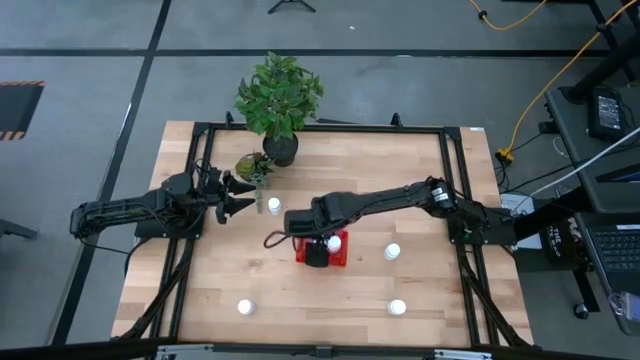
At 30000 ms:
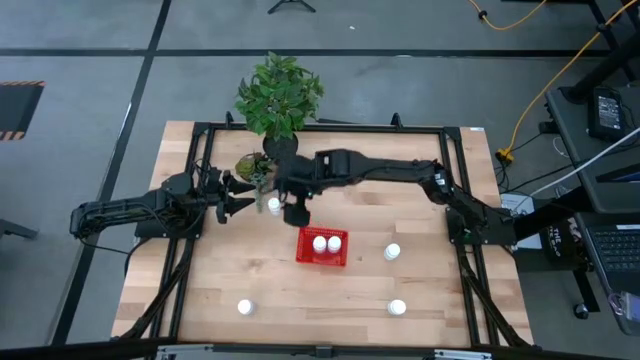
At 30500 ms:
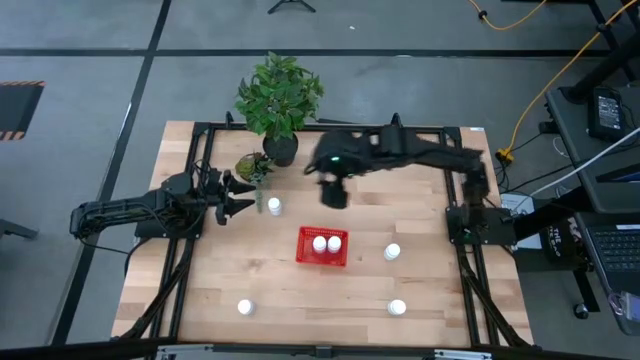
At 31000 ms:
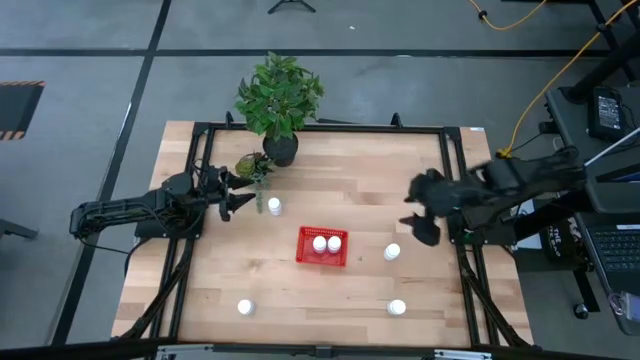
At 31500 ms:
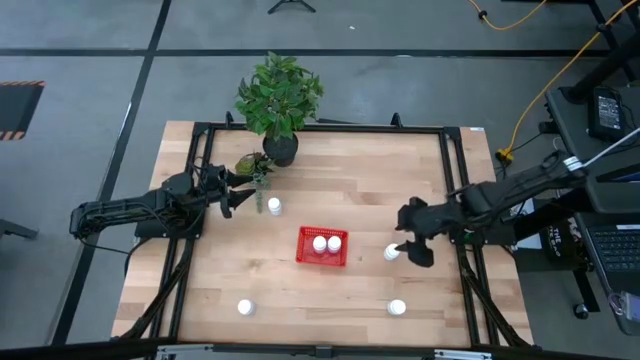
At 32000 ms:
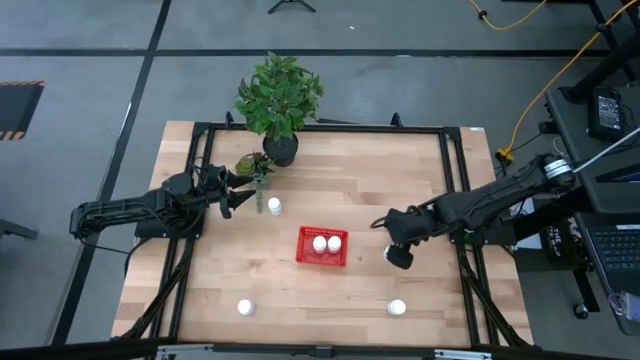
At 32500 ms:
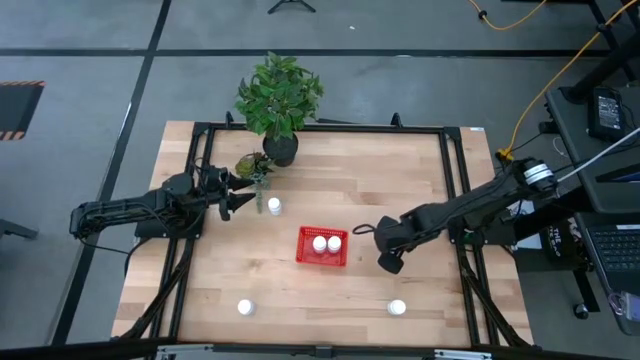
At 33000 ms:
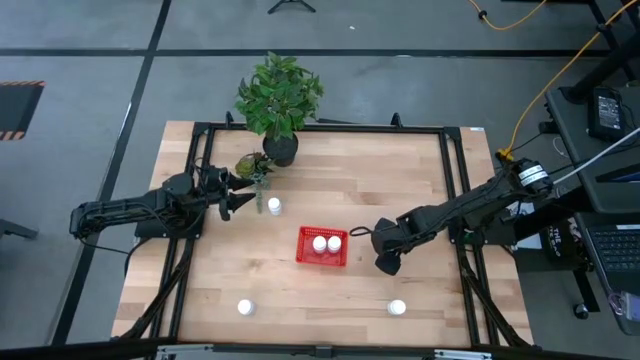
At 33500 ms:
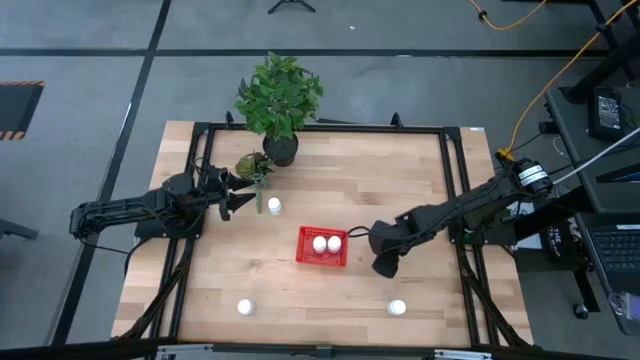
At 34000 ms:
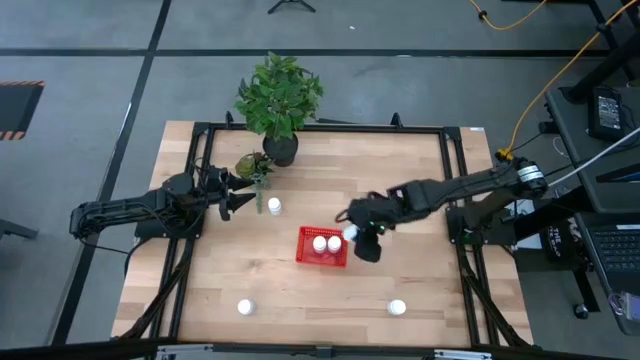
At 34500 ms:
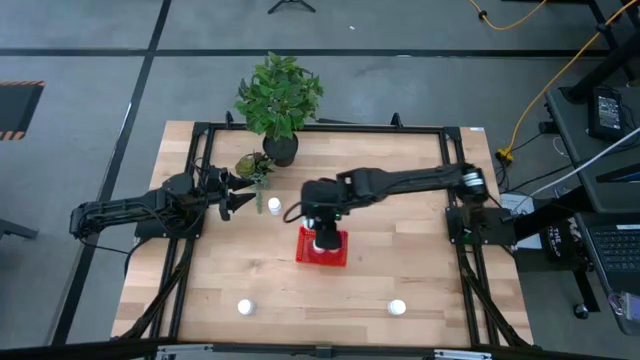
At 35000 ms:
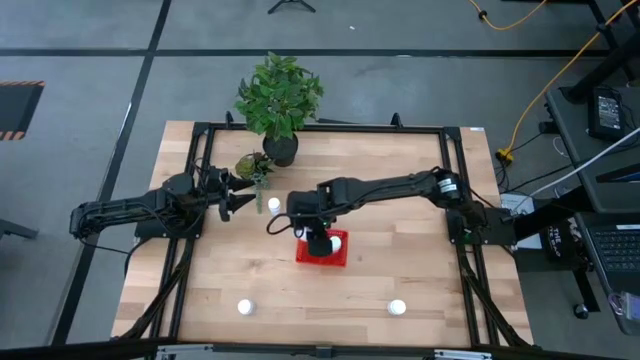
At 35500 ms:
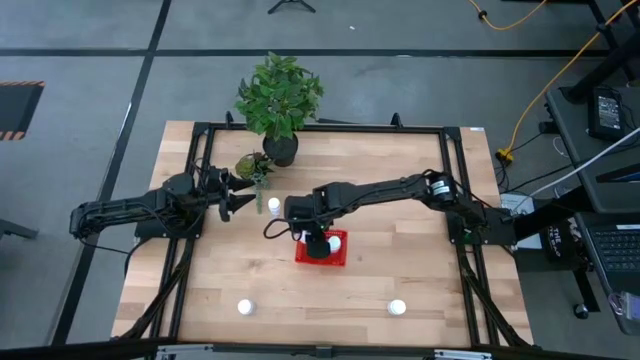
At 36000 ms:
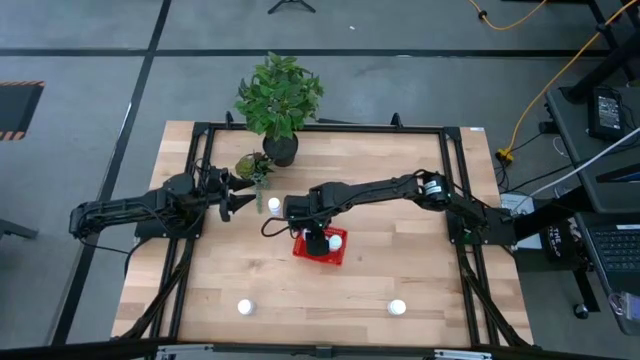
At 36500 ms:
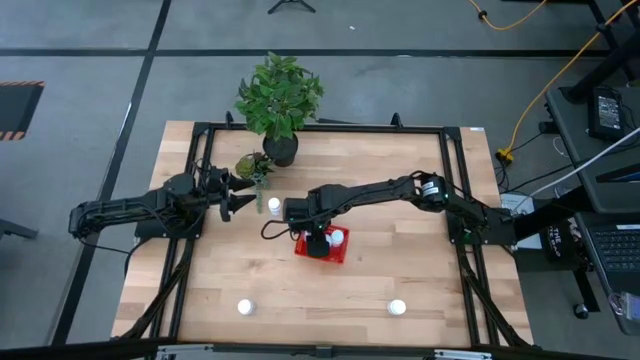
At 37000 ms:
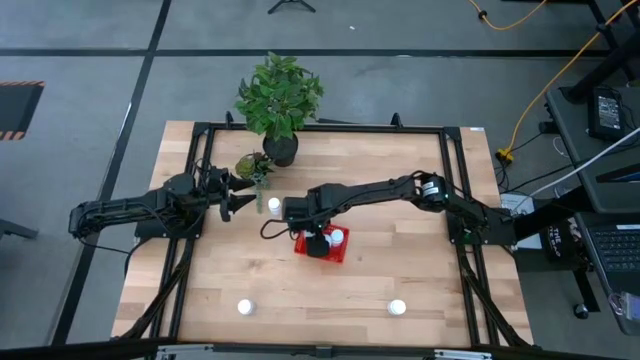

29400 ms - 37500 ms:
Task: Pick and place pill bottles into a basket
Put the white pill bottle into the bin

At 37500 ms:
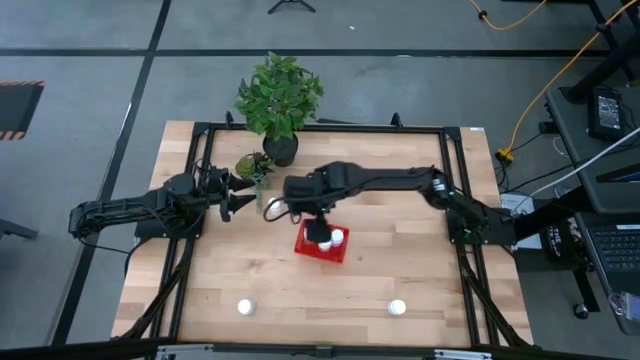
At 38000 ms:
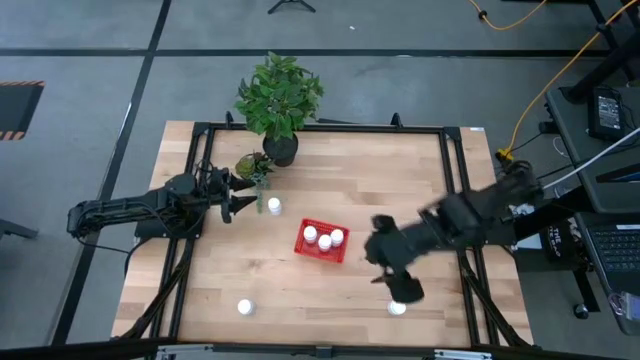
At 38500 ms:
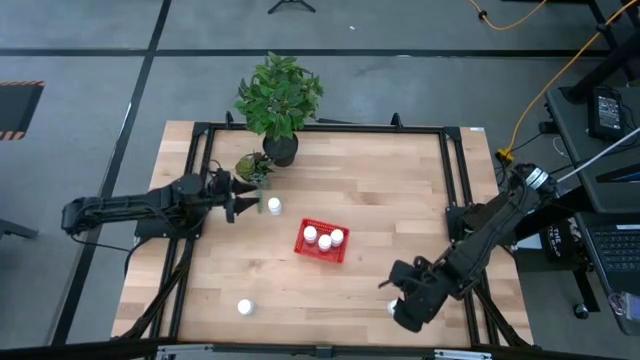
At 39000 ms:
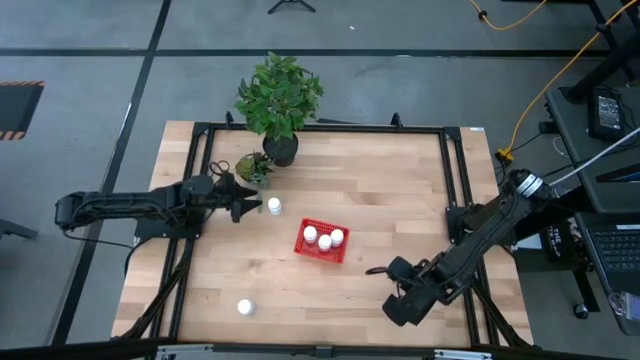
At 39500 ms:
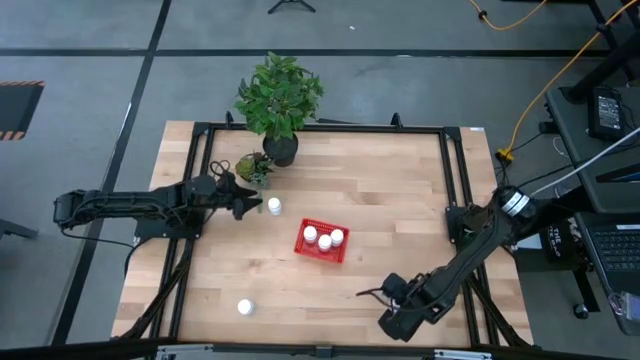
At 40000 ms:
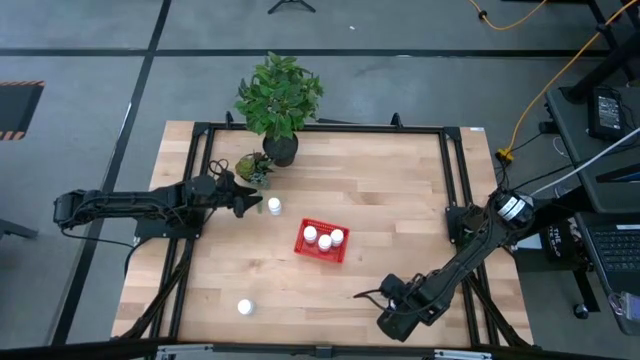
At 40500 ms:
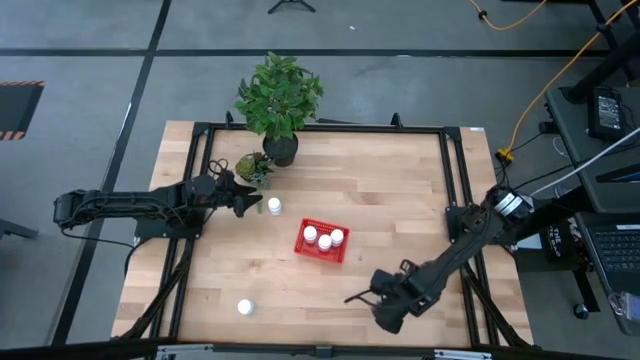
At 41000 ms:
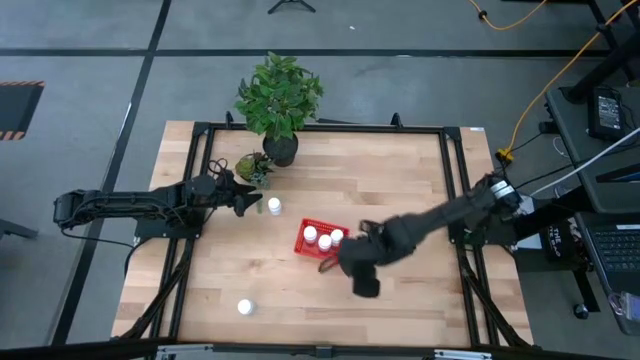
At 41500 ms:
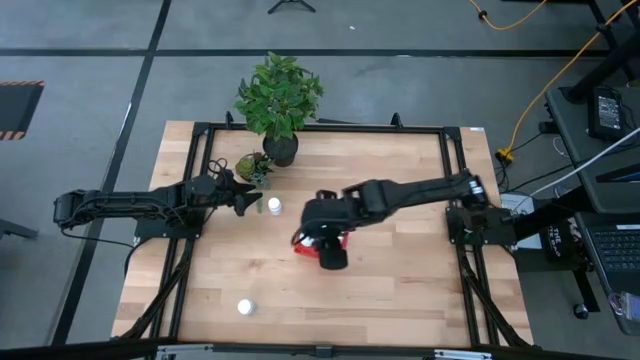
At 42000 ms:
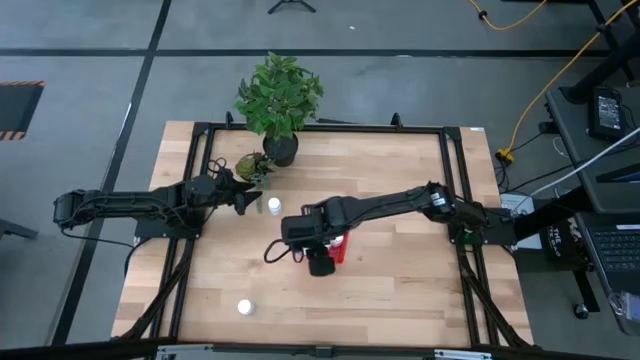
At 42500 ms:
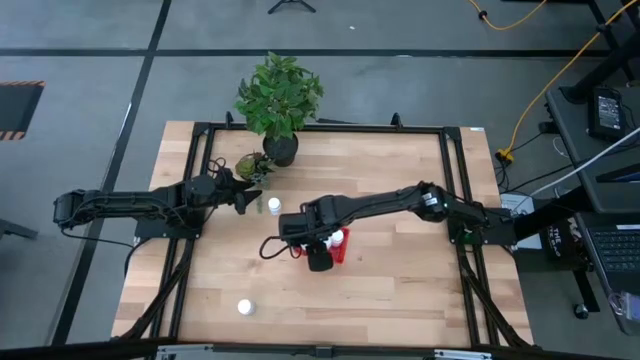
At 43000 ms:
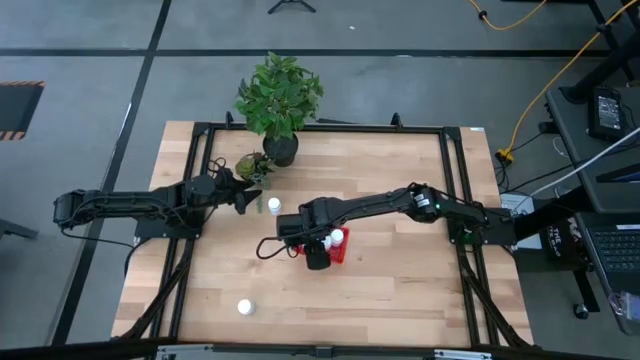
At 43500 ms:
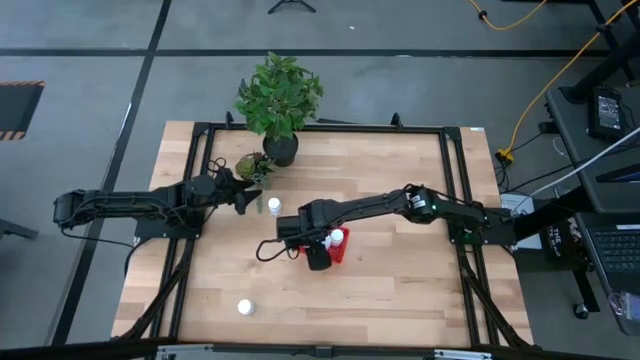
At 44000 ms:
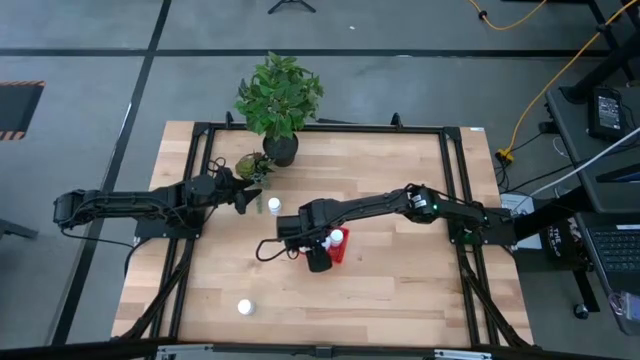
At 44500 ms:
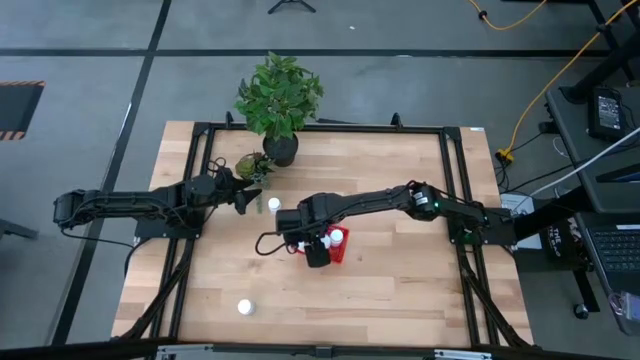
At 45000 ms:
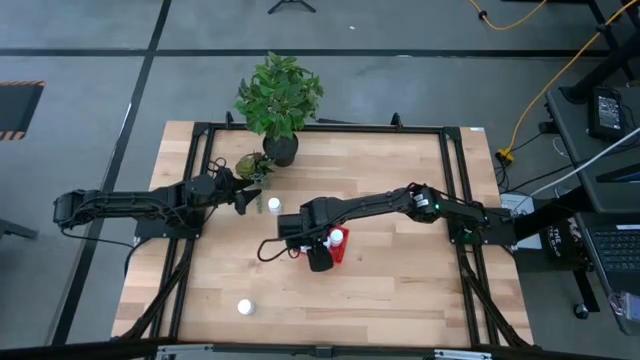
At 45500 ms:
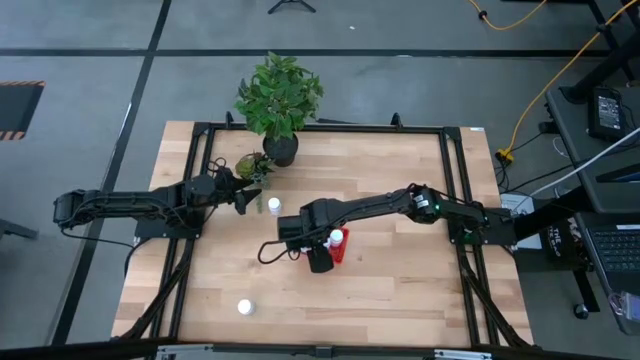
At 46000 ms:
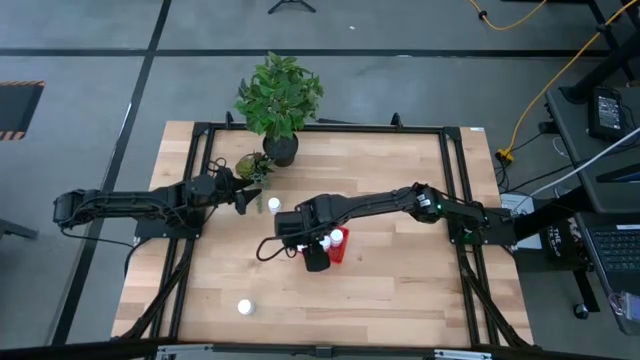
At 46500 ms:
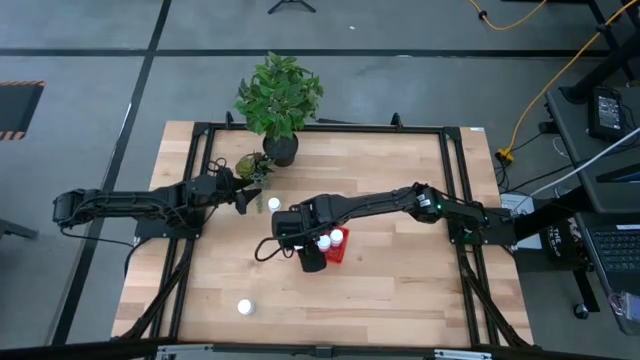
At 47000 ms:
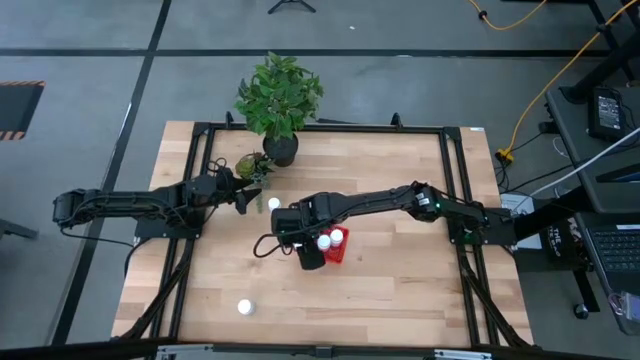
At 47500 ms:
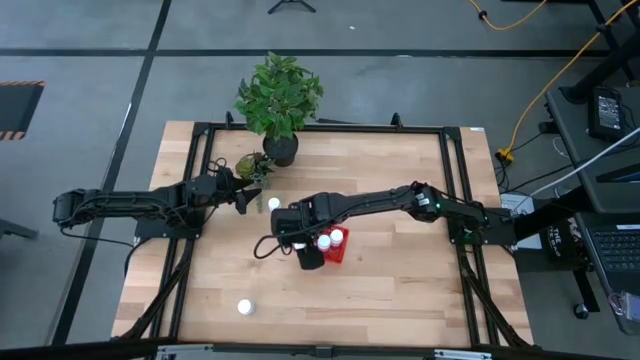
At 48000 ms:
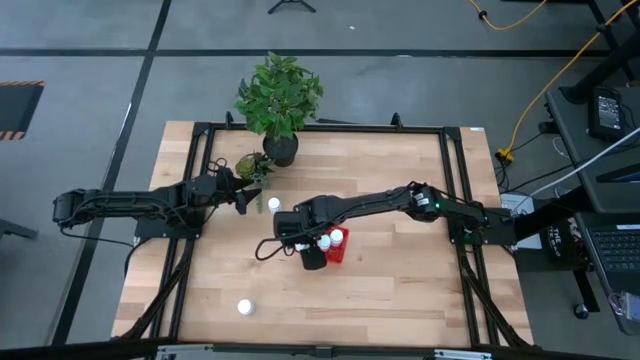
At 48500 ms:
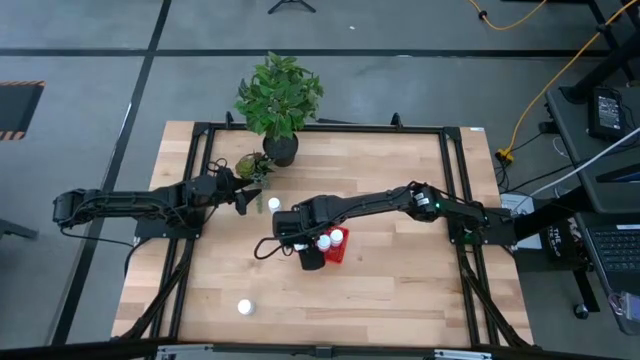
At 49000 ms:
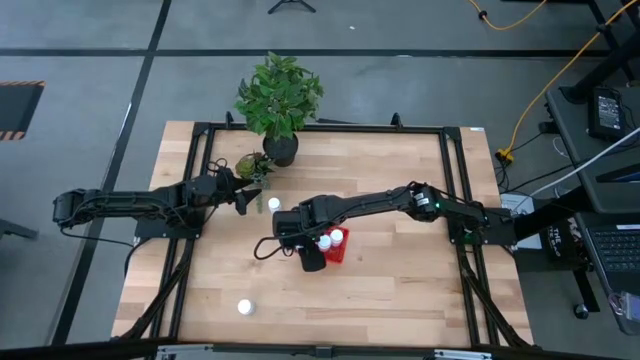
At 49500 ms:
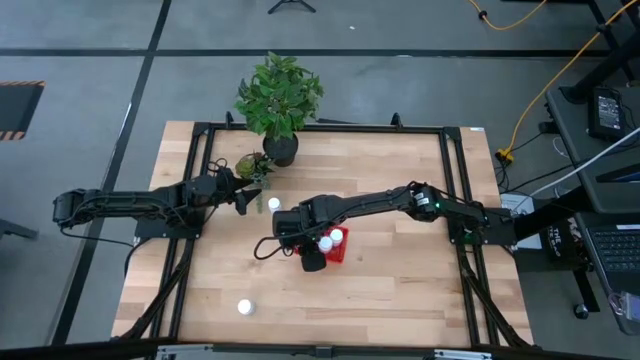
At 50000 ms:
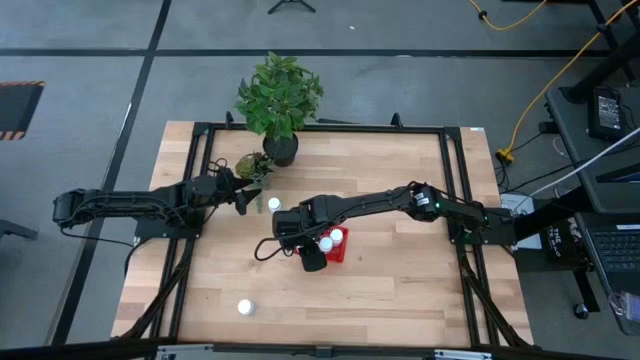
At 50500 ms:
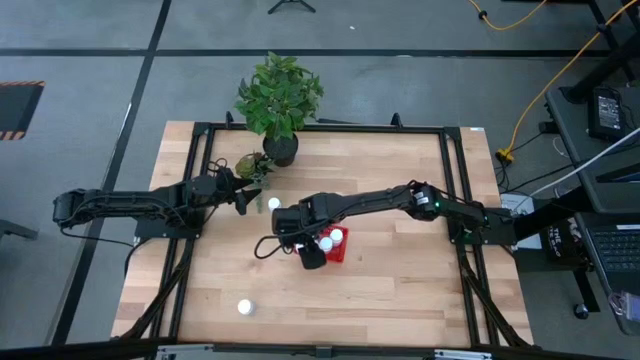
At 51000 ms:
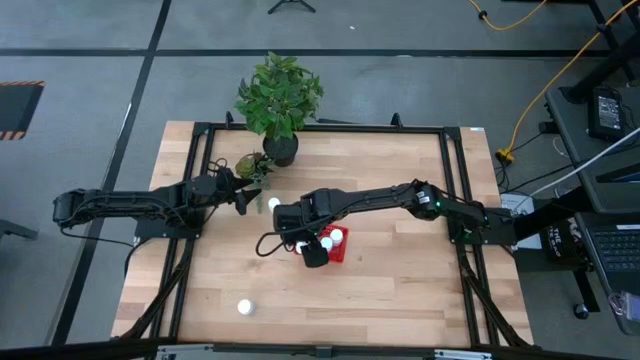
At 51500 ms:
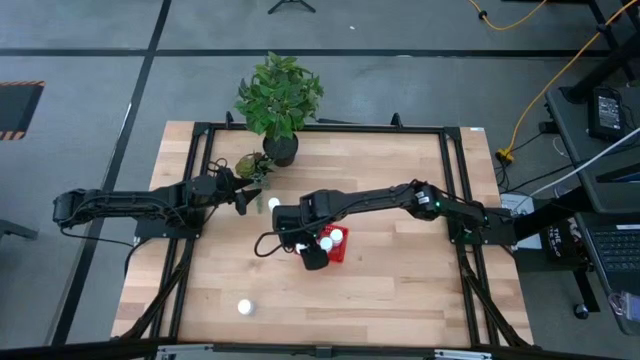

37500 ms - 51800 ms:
Put the white pill bottle into the bin
